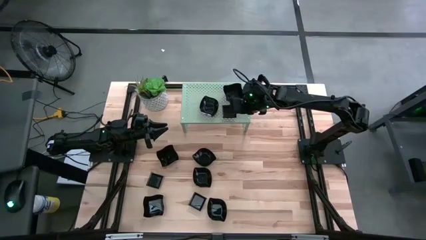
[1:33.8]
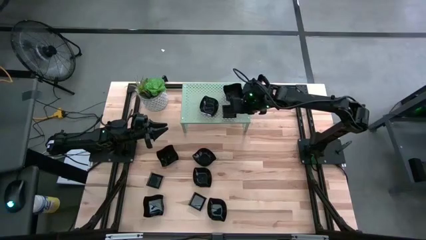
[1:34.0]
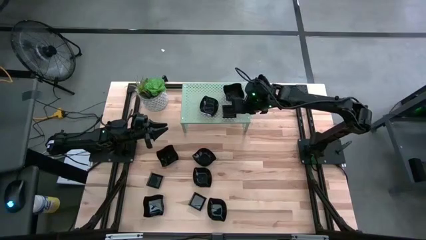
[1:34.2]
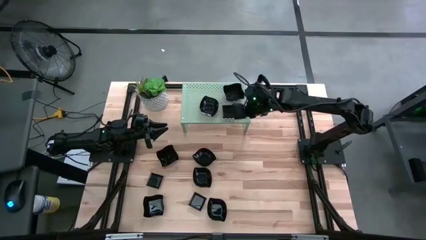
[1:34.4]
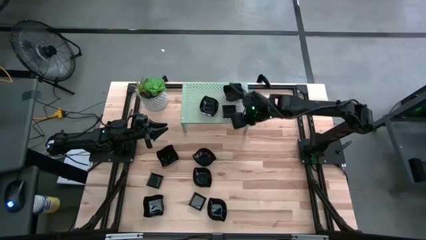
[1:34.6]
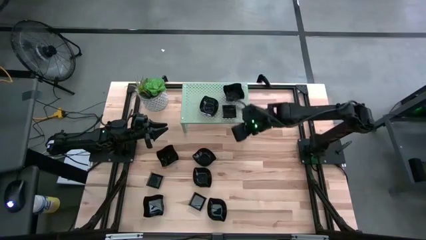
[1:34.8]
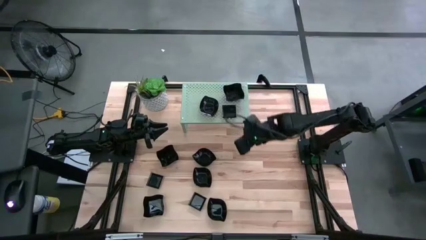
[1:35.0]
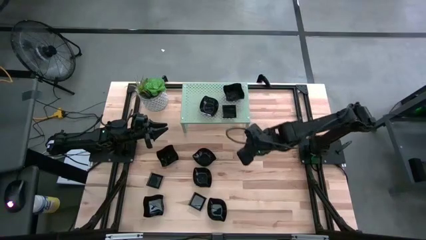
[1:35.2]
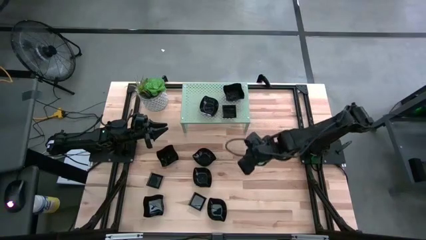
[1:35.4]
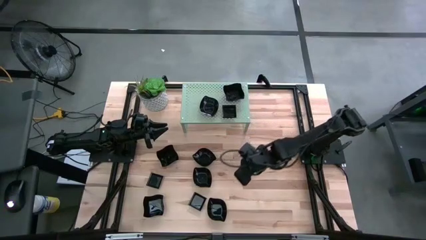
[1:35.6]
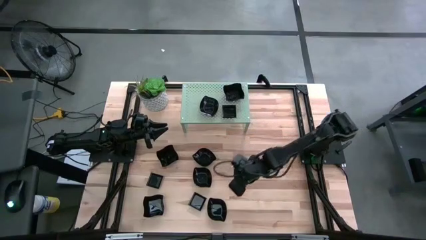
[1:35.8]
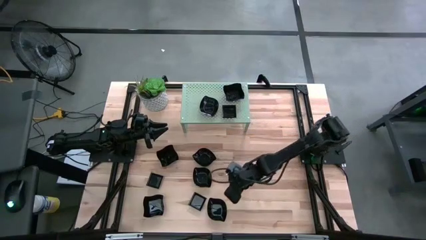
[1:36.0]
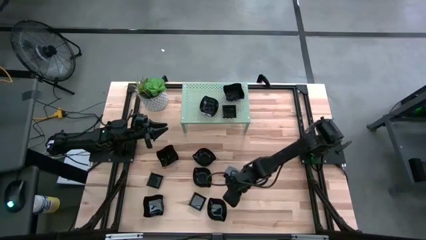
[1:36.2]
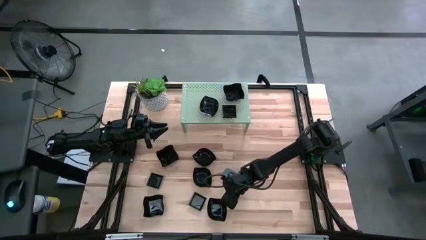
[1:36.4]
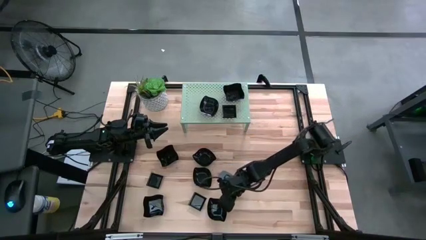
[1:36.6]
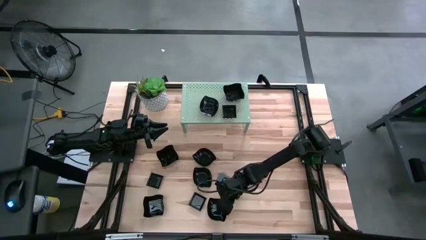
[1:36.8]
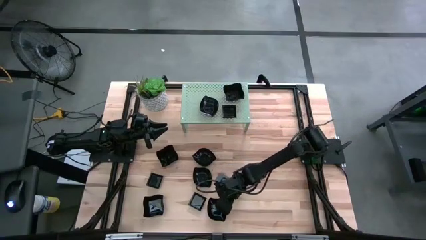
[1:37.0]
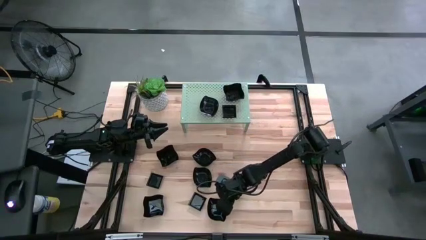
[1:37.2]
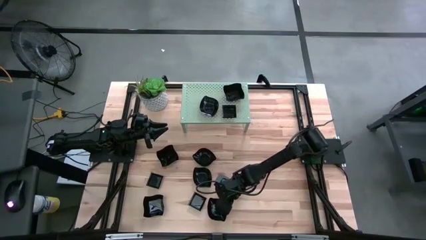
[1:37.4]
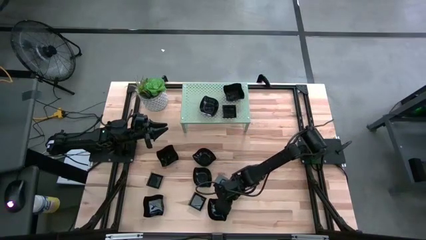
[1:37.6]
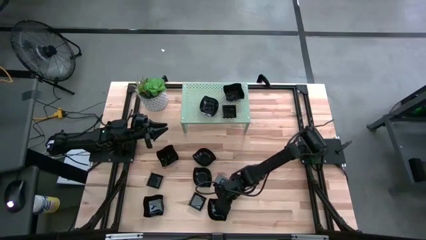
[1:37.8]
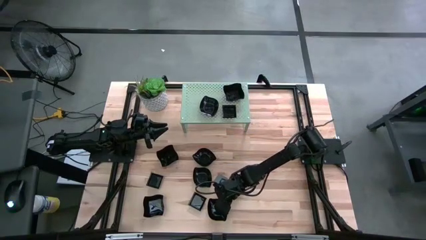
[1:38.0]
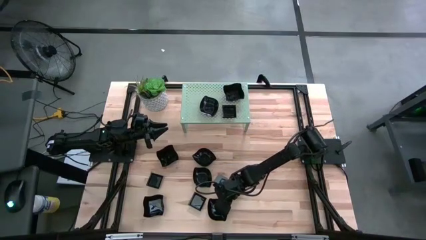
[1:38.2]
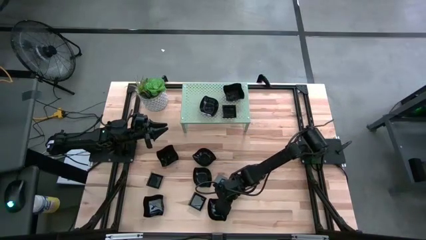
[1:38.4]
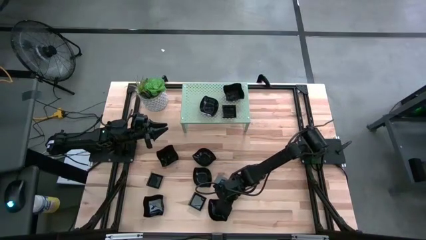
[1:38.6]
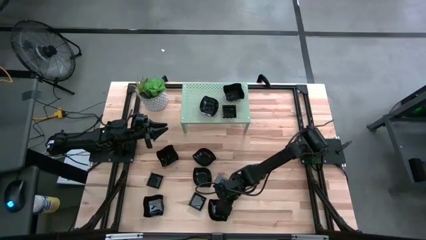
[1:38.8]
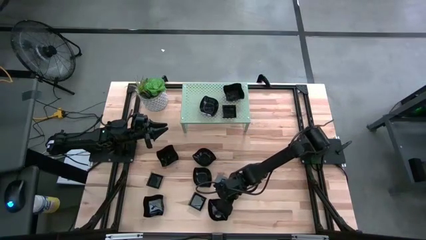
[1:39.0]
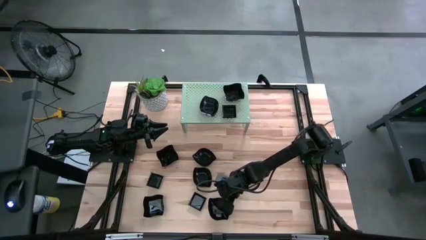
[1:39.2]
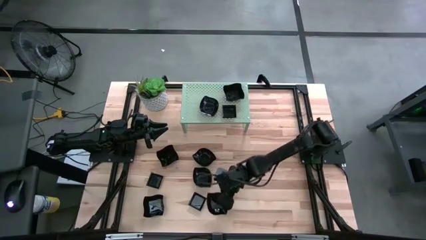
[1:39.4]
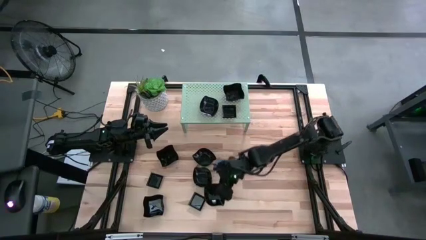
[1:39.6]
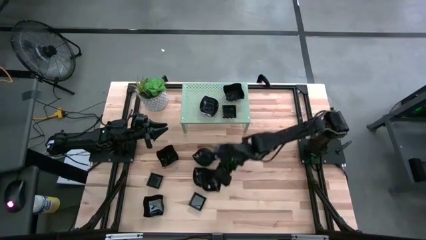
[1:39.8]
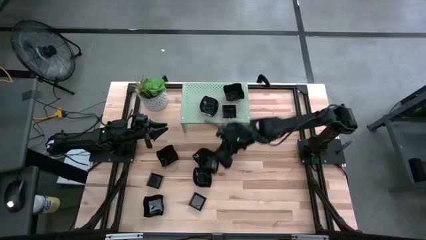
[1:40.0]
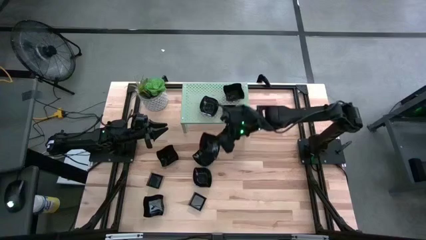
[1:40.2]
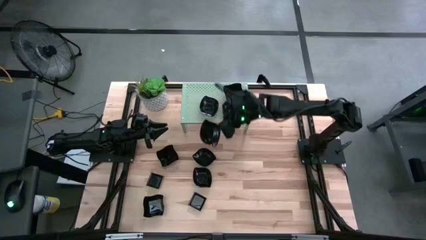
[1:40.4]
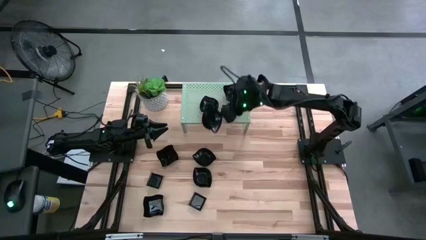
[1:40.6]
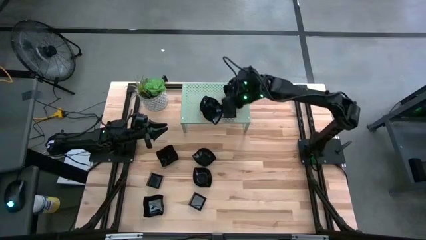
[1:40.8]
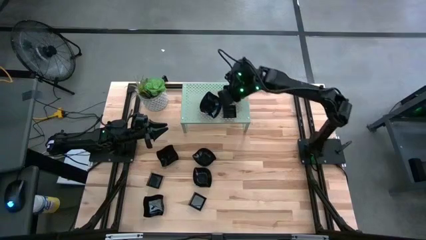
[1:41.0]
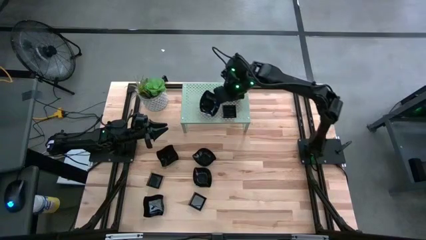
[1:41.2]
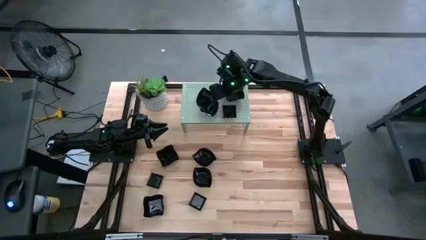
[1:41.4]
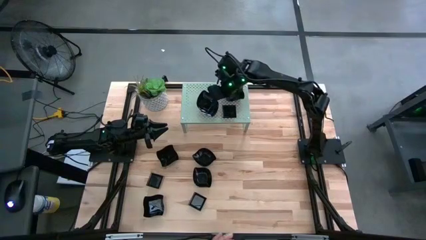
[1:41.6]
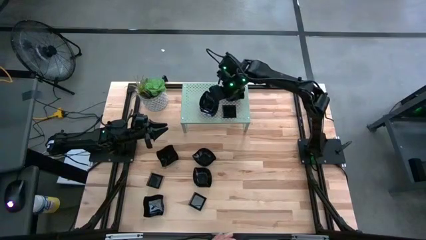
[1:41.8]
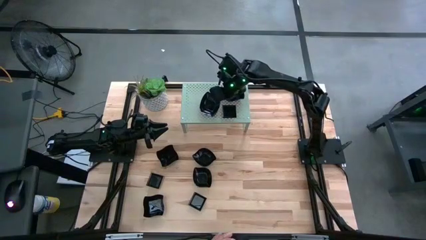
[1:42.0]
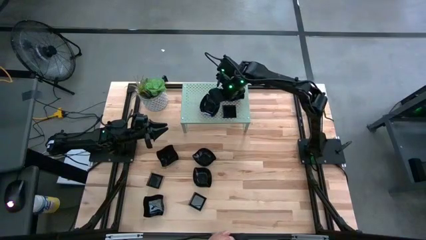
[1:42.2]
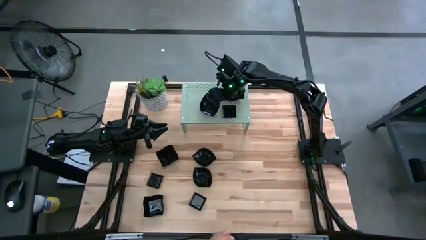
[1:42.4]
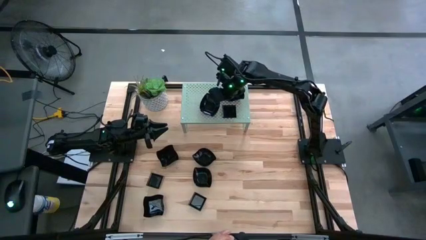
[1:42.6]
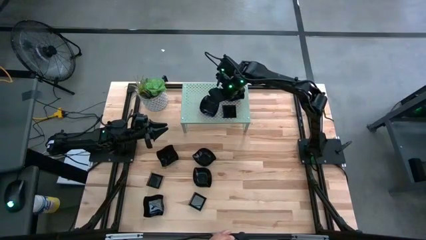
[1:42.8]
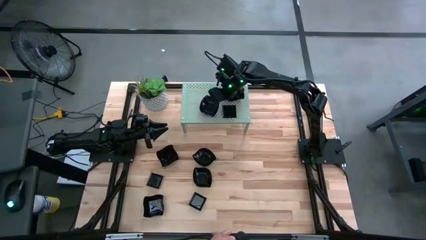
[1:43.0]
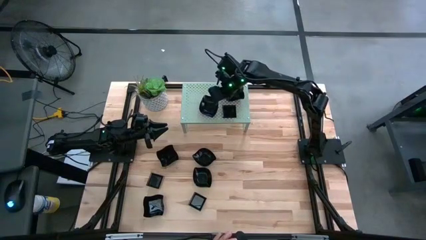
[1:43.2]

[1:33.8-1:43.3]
Task: Pick & Place Mini shaped plates
Stack the leaf shaped plate on top of the leaf shaped plate on the shelf

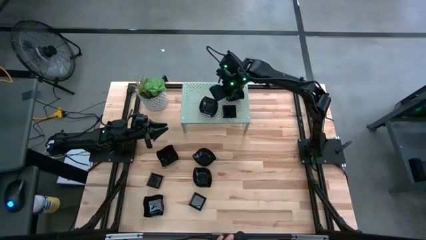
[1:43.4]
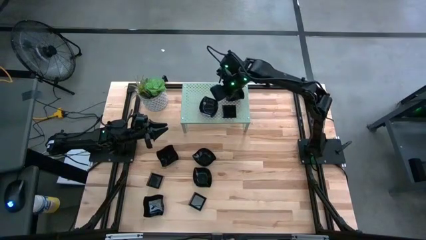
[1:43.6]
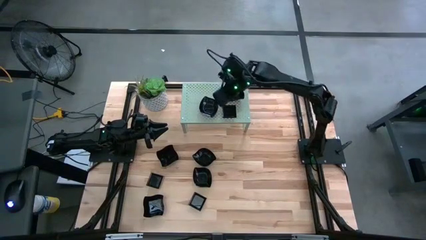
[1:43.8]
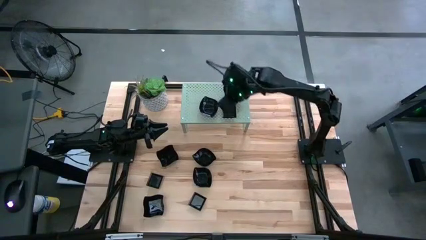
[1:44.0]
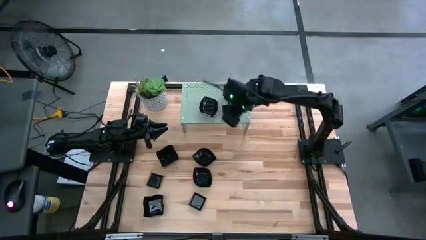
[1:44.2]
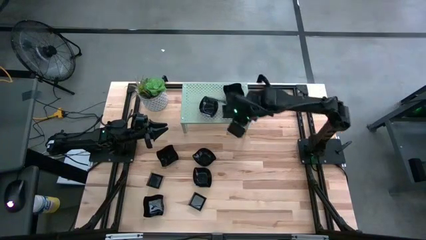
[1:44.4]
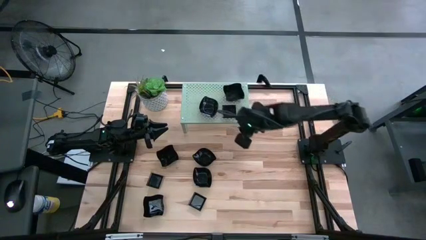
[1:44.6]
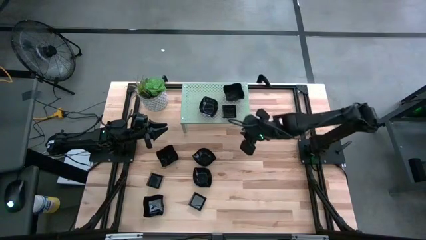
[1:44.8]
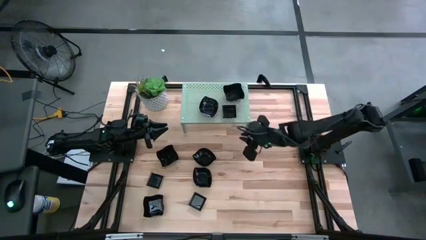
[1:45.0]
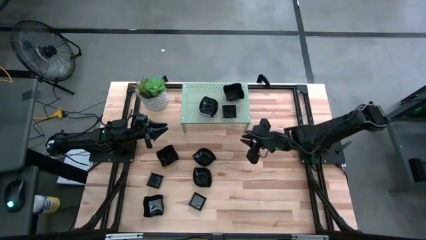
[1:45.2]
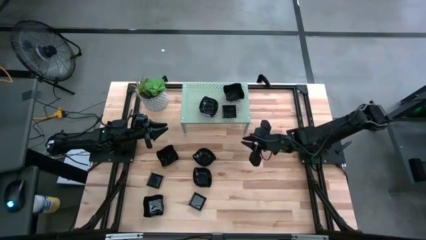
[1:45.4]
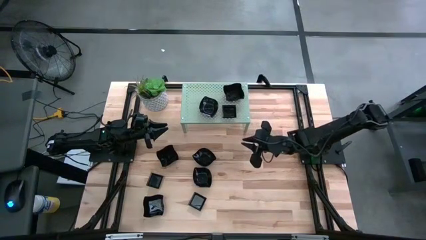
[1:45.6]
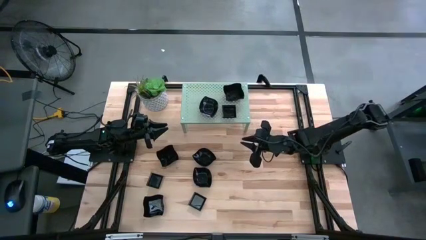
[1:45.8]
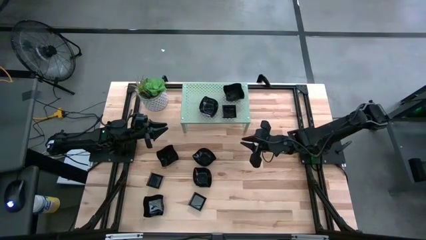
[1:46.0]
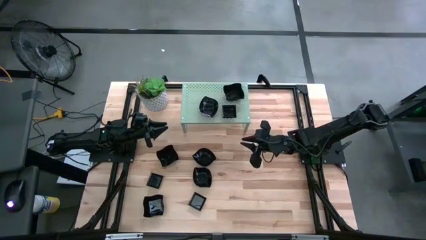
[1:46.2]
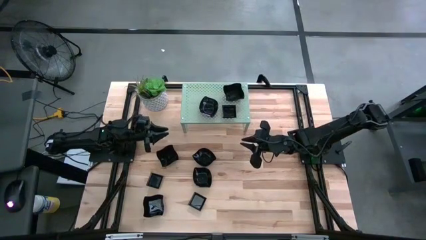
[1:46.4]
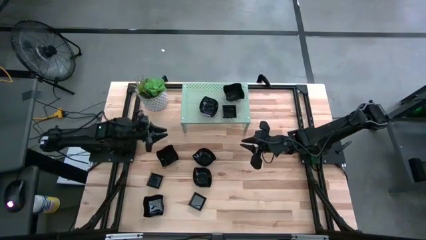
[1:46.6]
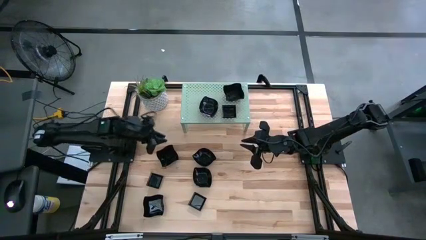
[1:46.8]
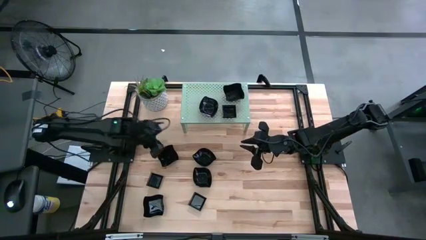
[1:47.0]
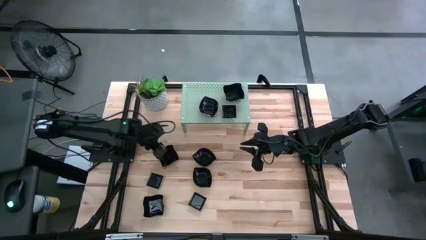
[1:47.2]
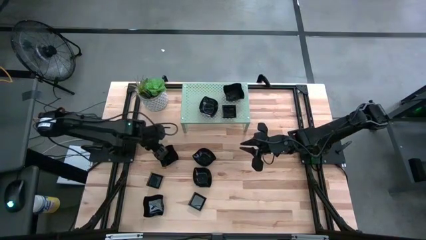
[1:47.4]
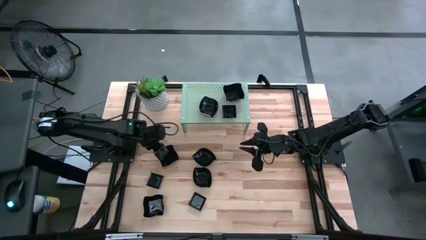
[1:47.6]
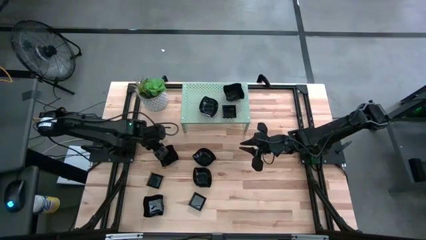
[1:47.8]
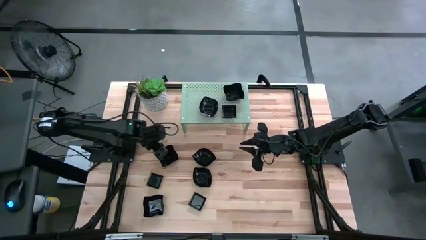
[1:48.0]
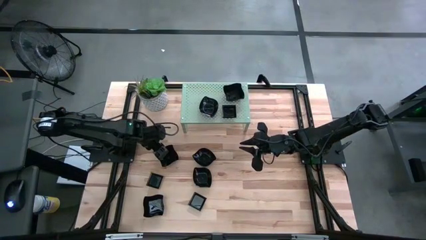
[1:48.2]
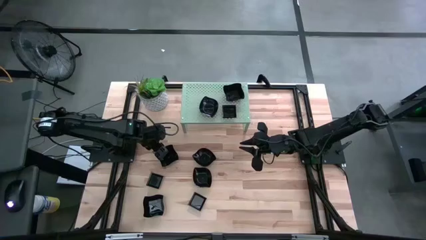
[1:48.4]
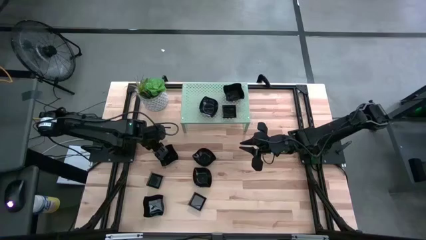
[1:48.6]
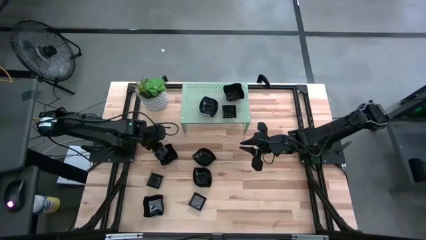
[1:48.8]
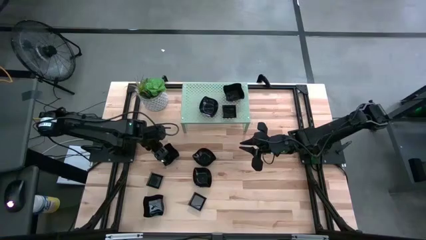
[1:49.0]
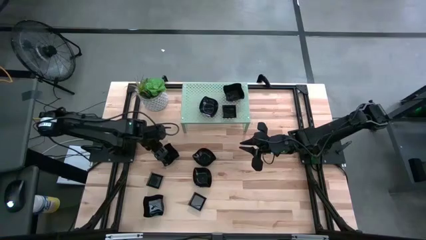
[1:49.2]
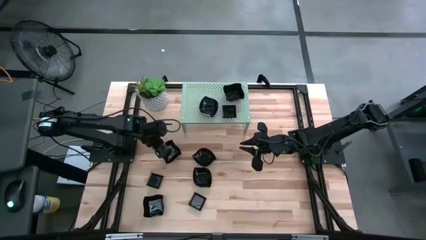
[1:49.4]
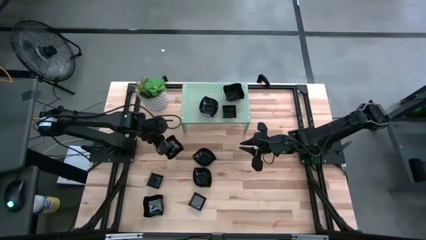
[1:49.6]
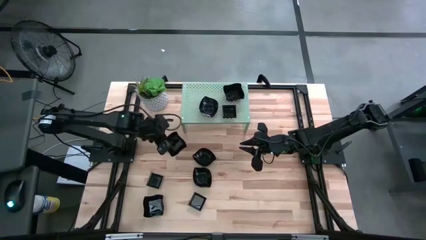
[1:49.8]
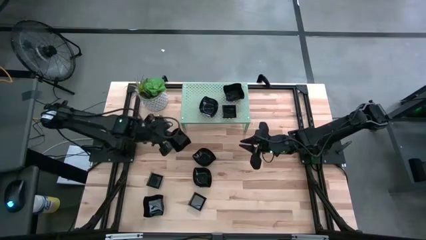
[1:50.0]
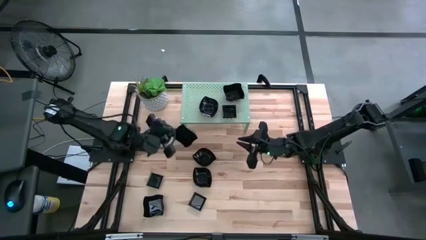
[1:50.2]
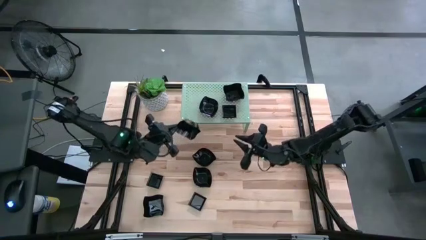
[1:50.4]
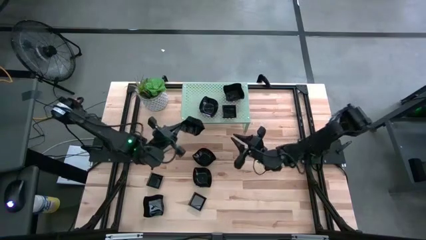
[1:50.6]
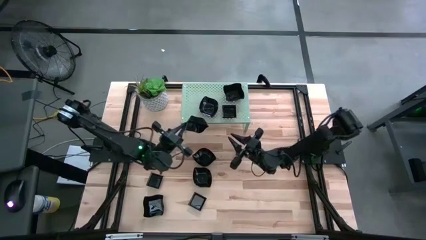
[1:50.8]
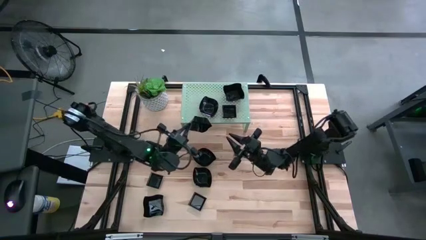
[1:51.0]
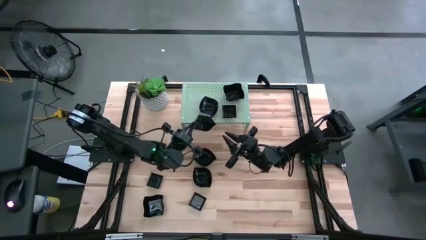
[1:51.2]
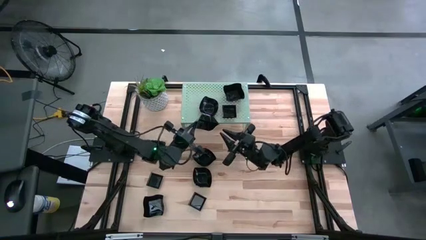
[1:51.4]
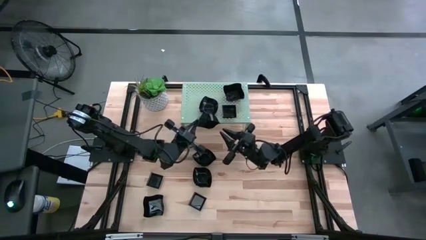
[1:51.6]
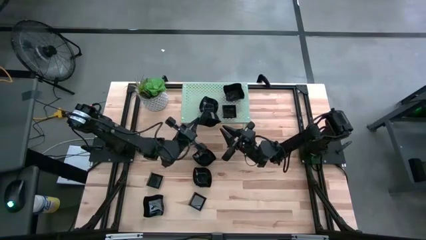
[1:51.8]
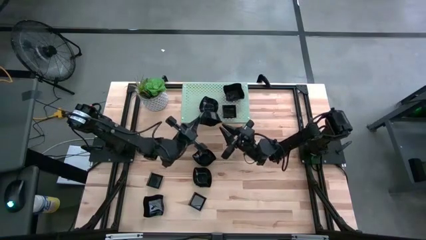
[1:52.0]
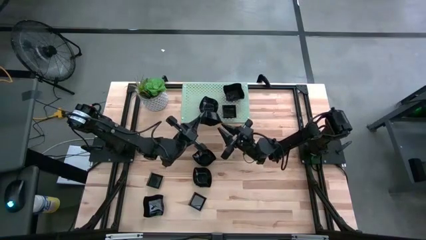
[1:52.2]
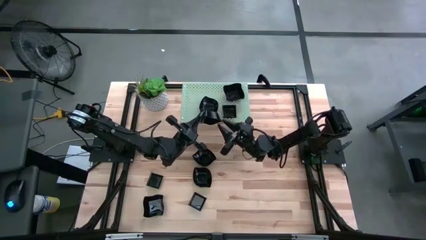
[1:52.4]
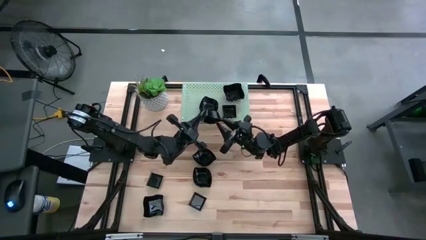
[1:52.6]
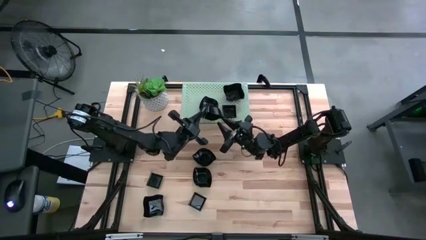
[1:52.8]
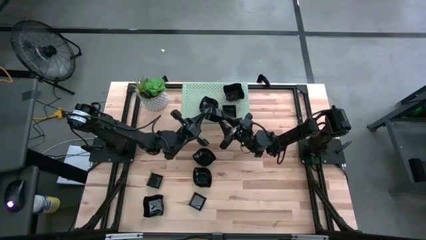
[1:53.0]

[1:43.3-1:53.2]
Stack the distorted square plate on top of the distorted square plate on the shelf
